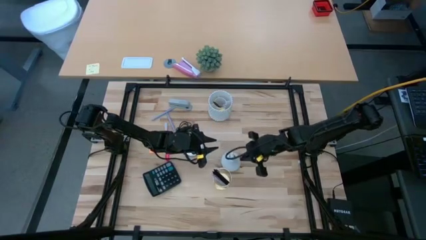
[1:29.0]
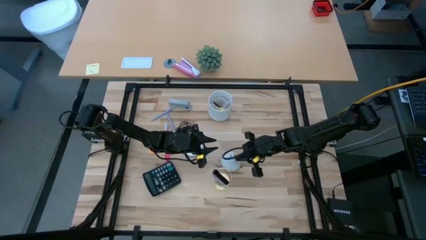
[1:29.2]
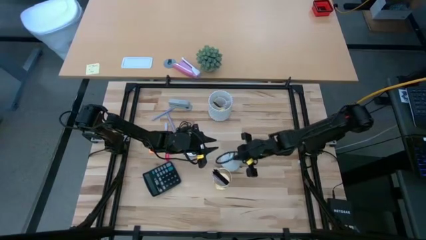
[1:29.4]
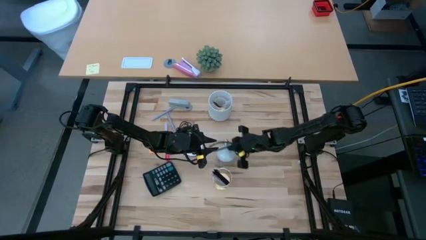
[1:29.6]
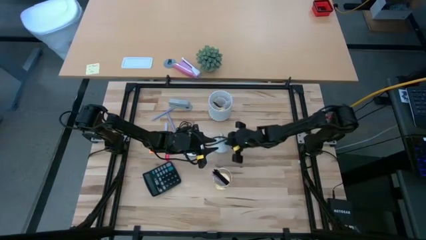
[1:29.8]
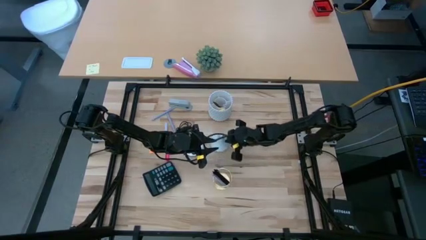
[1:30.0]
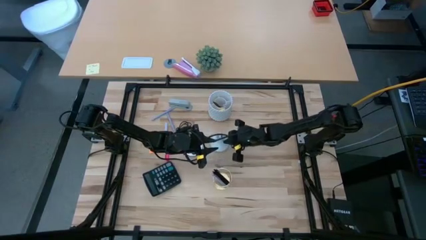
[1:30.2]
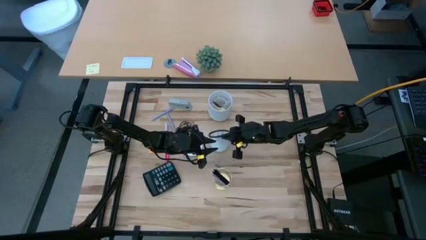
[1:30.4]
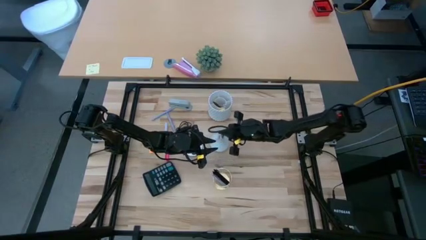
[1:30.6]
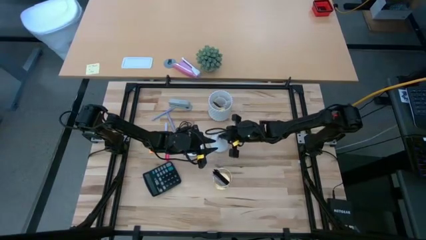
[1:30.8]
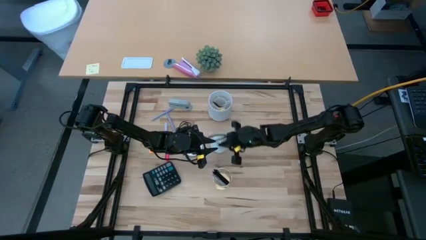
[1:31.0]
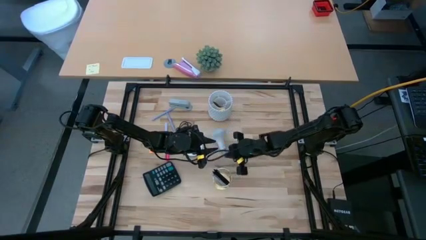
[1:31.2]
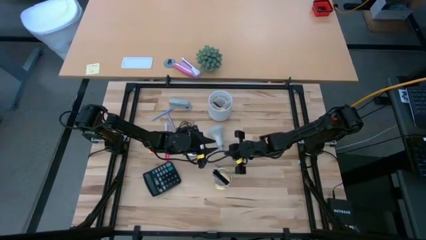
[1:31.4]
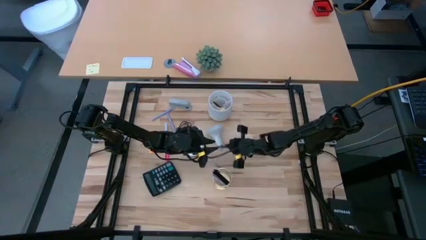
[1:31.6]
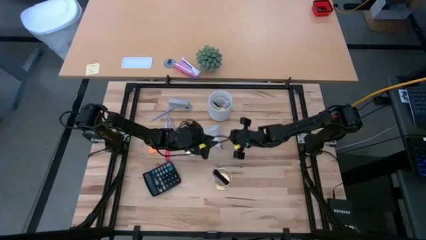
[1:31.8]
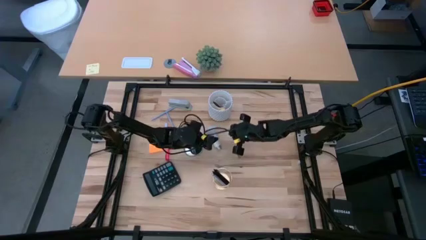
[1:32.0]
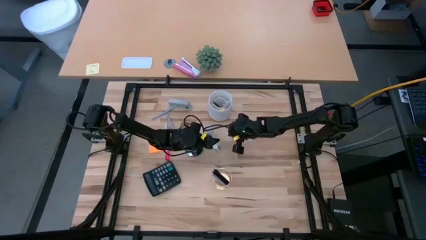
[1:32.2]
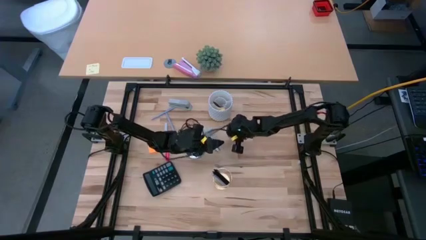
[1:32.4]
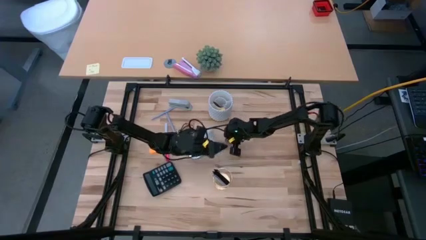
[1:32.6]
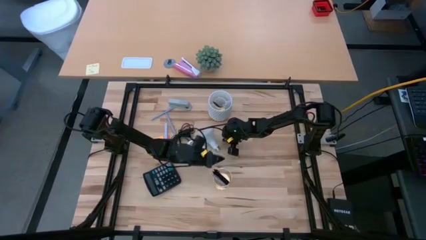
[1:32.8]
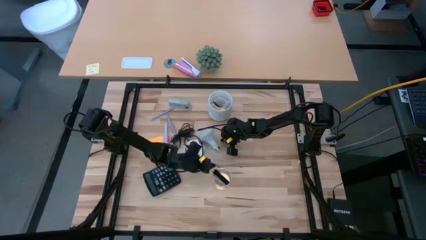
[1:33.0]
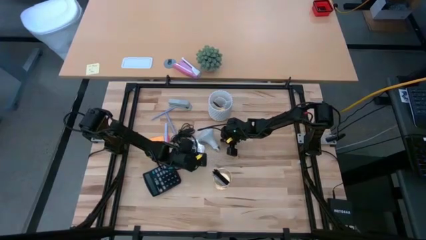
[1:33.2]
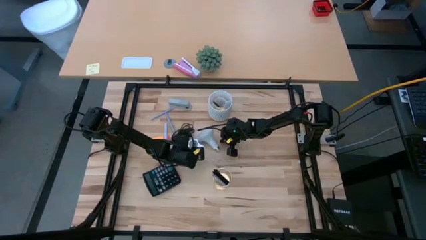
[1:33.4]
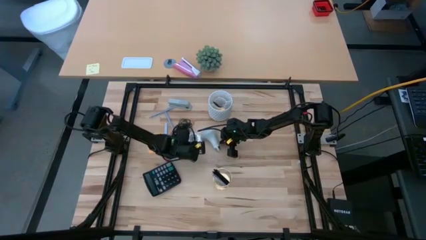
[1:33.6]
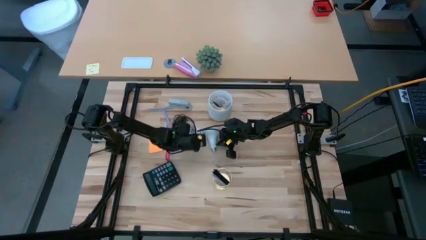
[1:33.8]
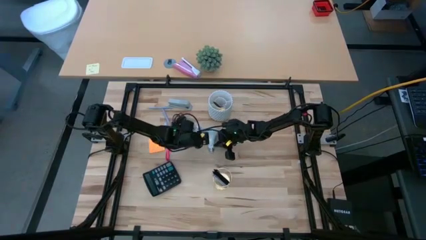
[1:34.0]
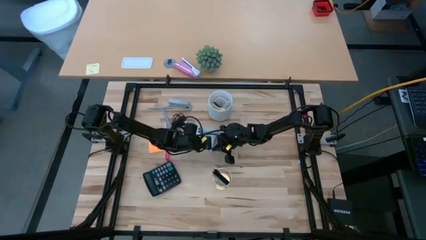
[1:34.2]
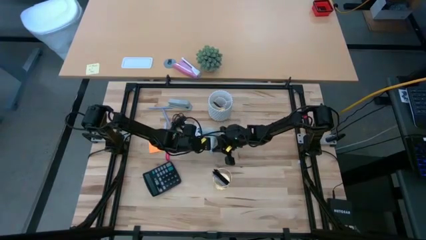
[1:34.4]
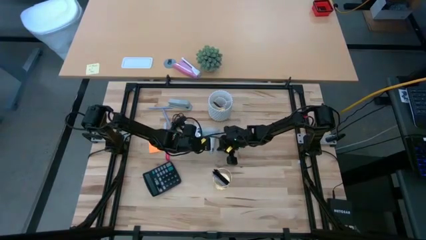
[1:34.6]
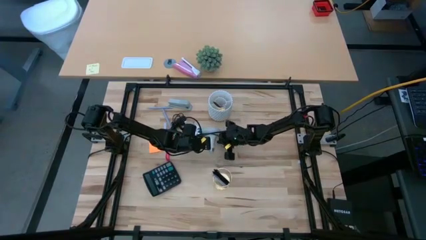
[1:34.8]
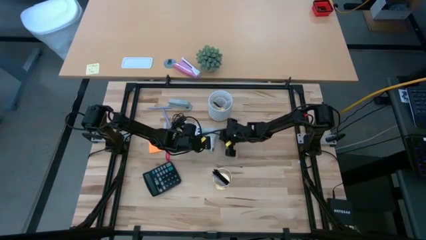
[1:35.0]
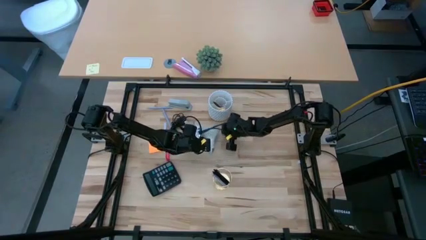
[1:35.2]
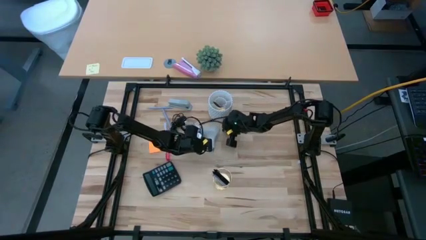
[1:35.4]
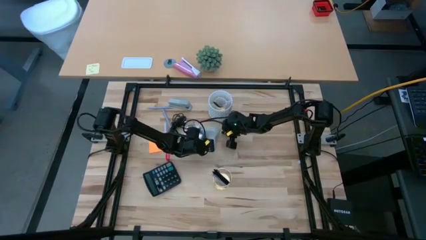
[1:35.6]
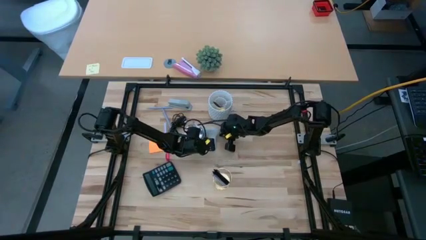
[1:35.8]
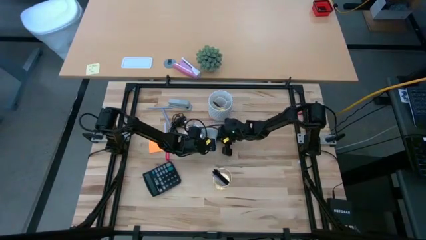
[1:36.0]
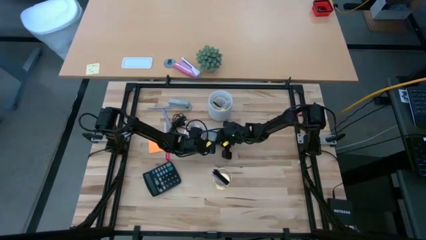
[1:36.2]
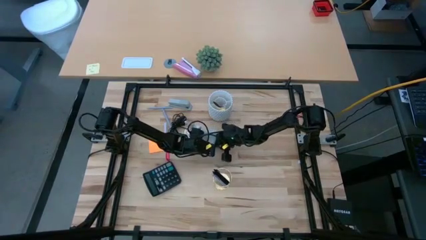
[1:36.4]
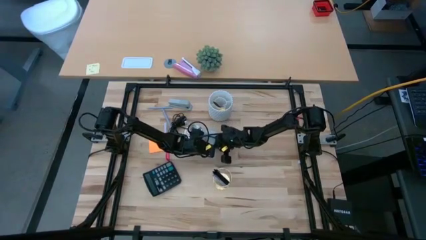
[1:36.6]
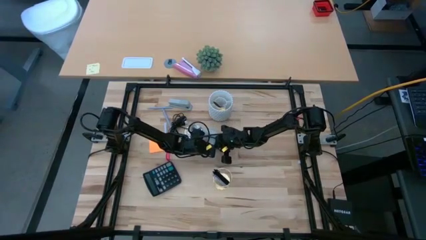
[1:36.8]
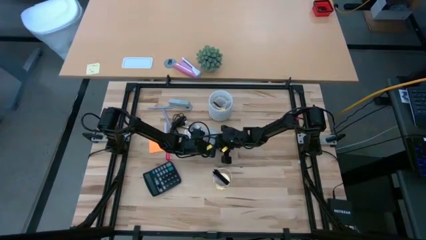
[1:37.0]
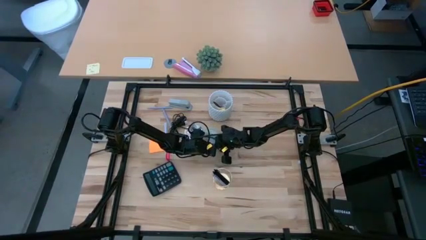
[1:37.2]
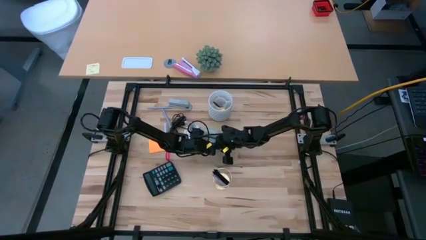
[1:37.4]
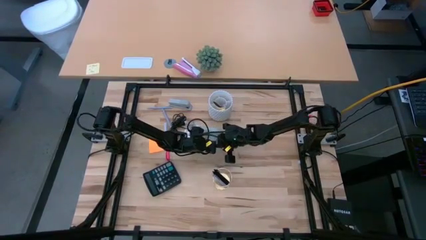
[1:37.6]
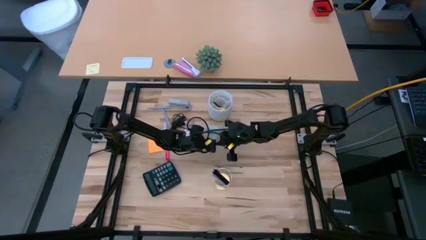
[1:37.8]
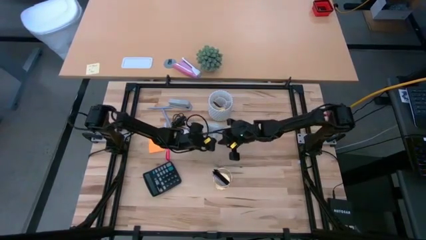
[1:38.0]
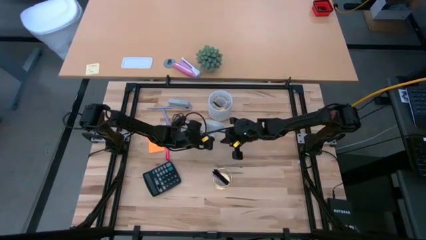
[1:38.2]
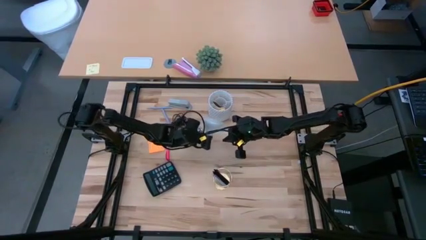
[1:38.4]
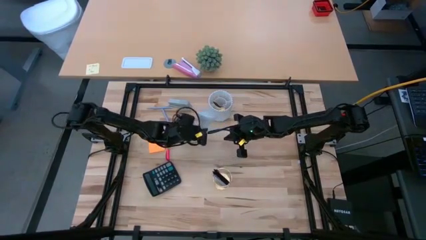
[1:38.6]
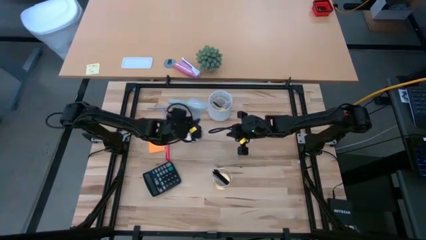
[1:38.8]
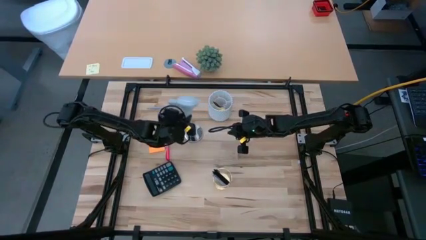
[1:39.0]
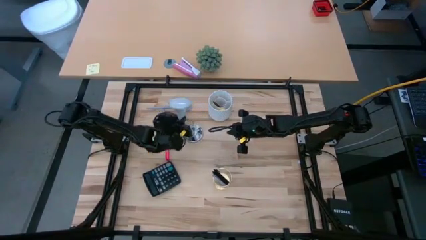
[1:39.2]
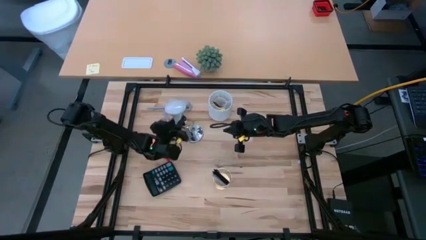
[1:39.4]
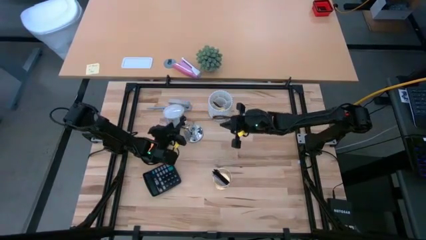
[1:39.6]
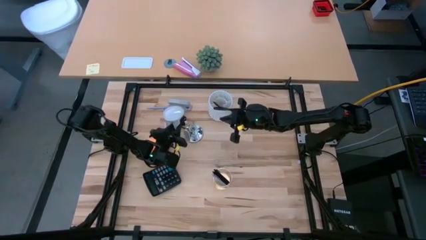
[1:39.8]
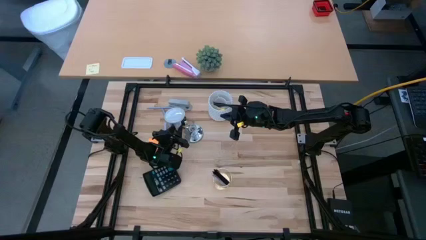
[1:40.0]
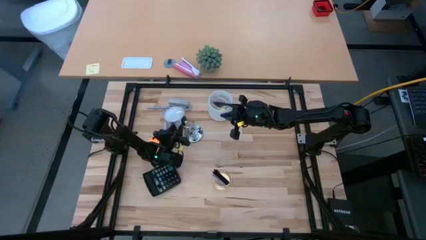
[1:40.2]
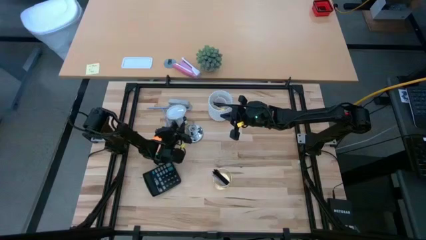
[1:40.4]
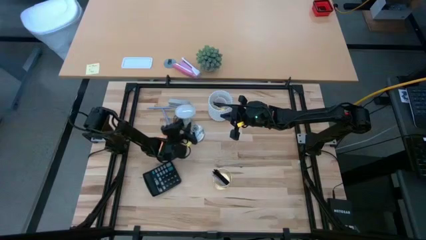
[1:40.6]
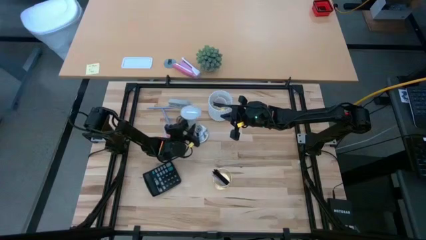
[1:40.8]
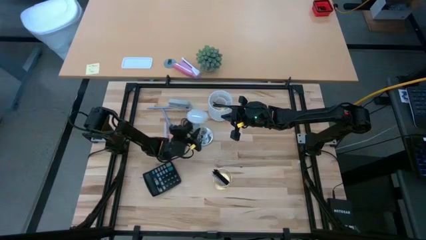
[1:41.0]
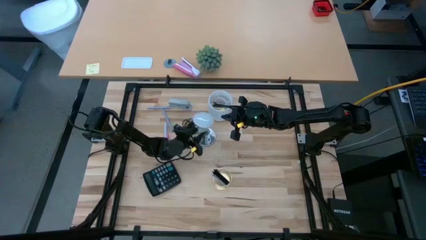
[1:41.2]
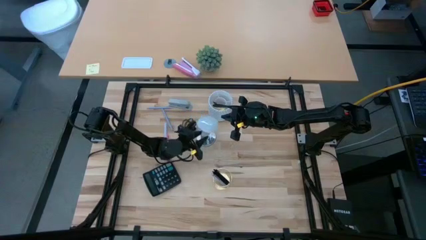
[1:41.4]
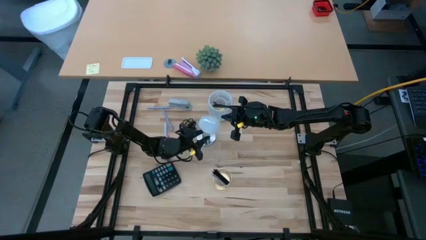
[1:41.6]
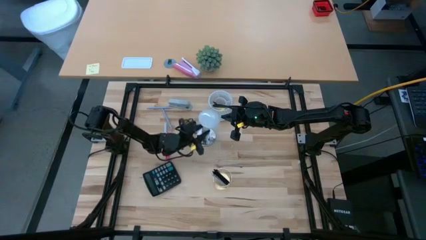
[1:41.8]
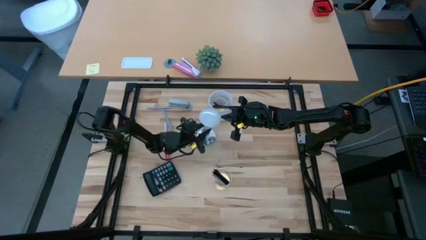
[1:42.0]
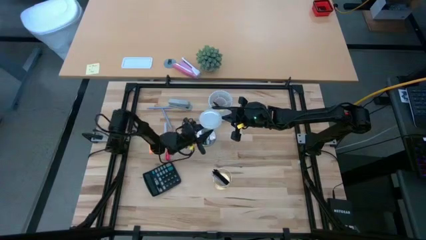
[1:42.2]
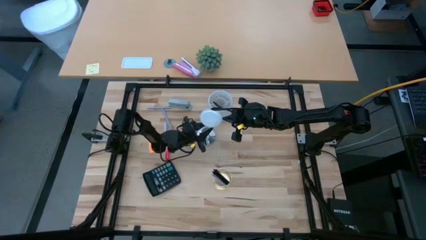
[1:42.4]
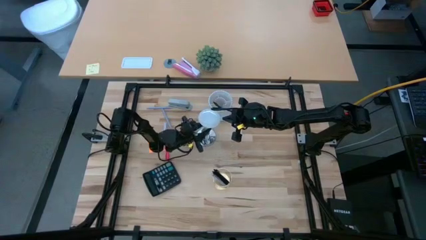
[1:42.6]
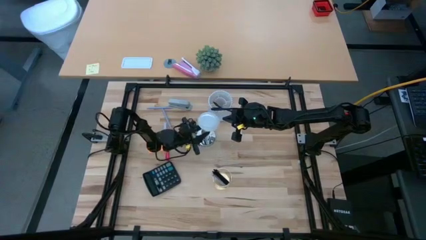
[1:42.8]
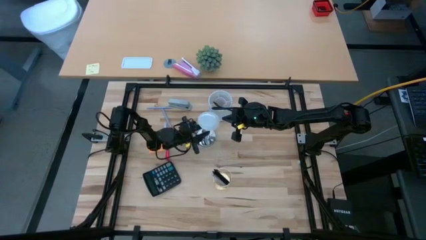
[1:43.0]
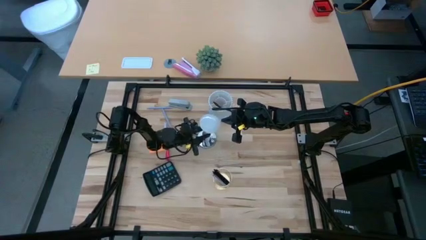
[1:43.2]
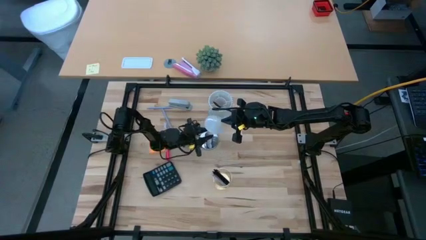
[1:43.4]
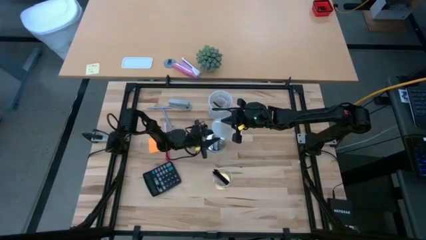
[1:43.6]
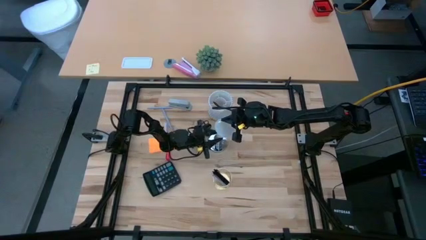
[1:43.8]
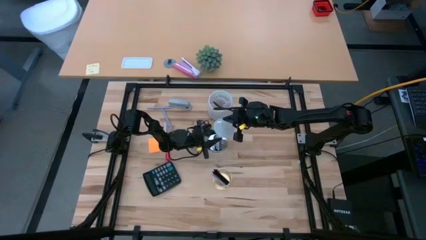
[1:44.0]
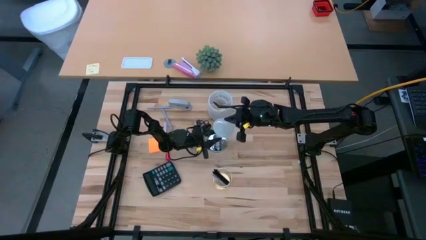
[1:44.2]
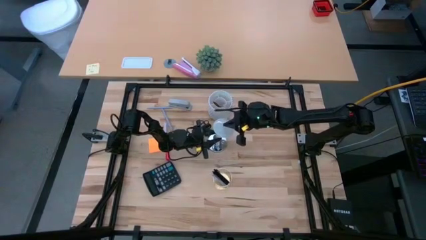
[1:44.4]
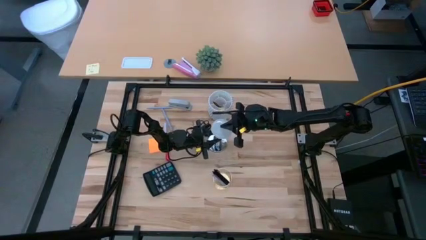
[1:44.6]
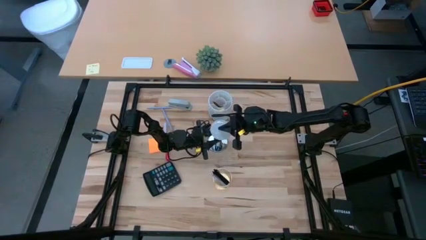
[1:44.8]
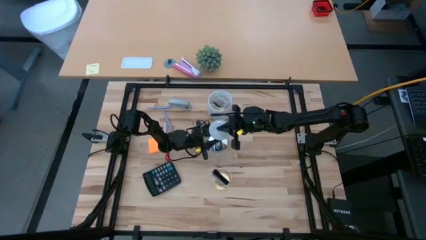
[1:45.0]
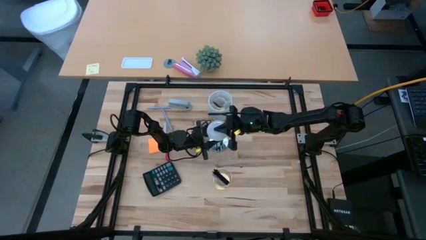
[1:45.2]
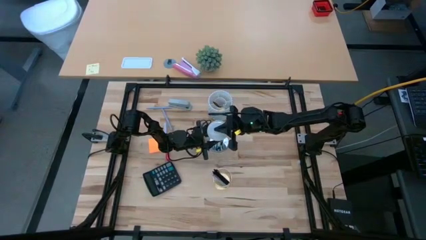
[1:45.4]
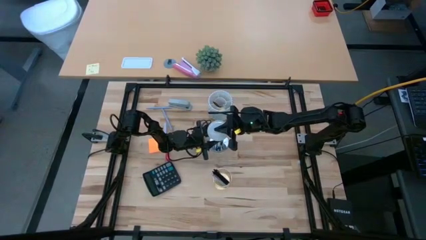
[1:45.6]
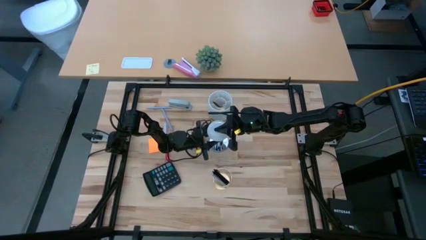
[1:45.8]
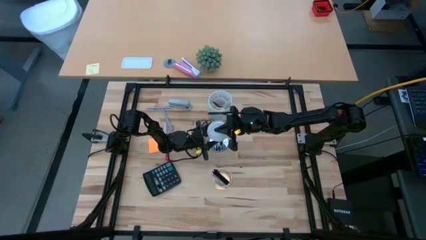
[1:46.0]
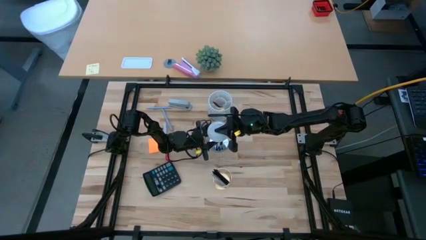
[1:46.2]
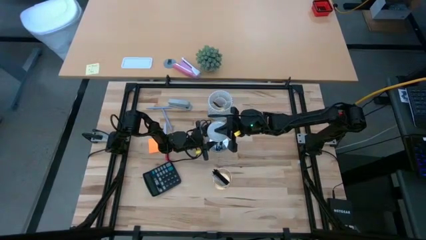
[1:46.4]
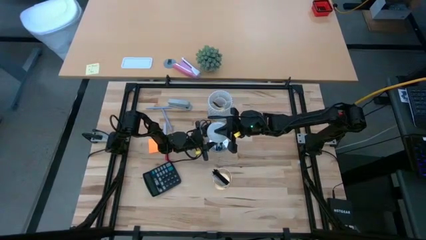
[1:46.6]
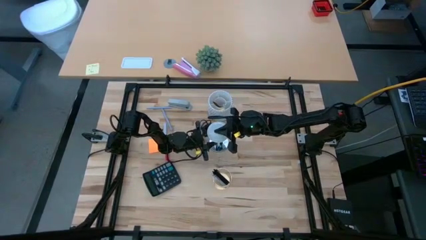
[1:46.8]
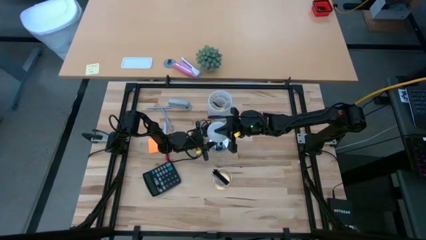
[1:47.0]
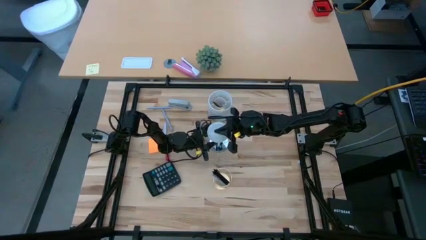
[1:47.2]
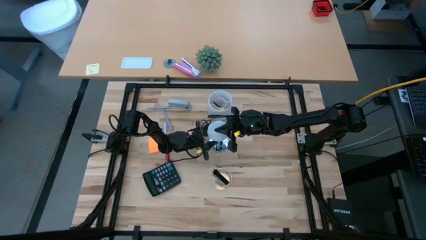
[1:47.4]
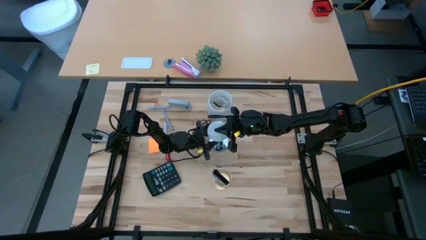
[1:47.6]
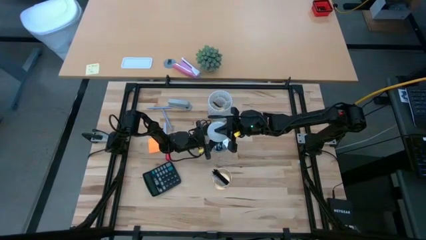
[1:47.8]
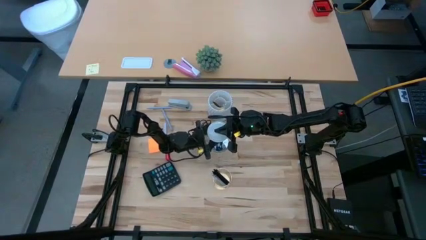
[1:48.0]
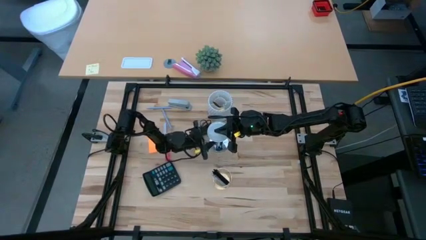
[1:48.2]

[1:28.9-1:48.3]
Task: Screw lightbulb
Insert the lightbulb into the lamp
